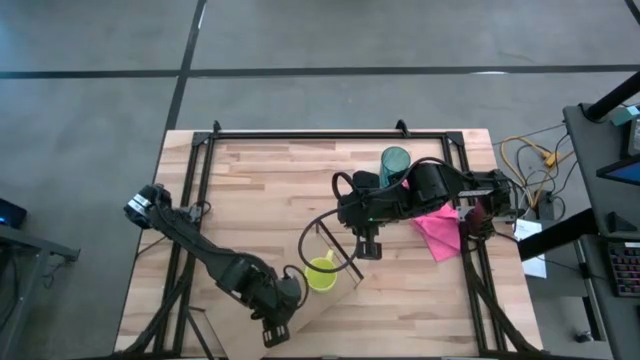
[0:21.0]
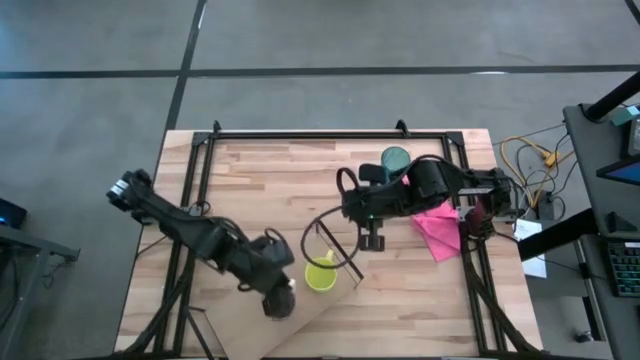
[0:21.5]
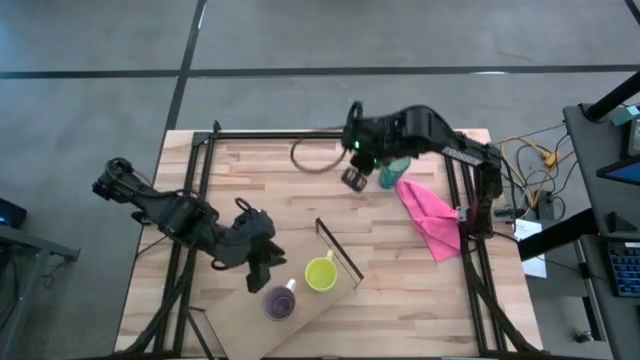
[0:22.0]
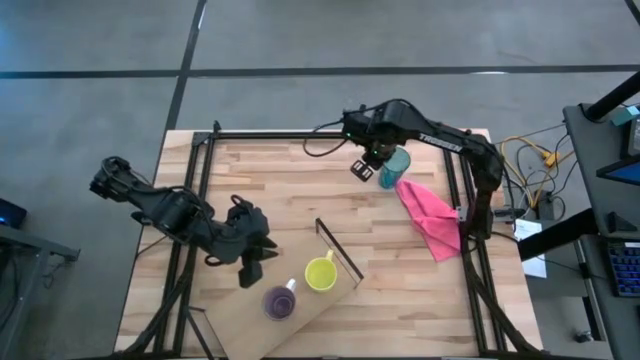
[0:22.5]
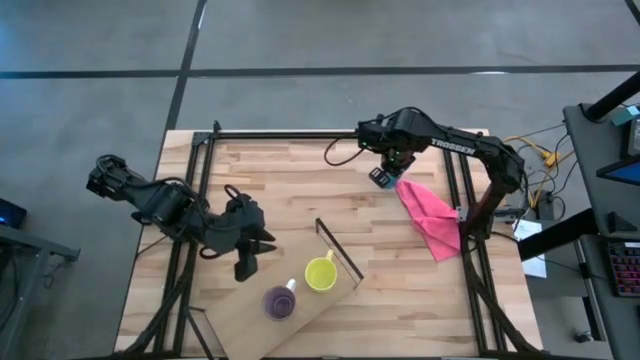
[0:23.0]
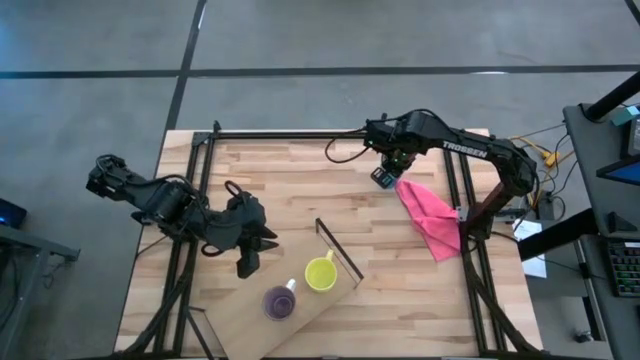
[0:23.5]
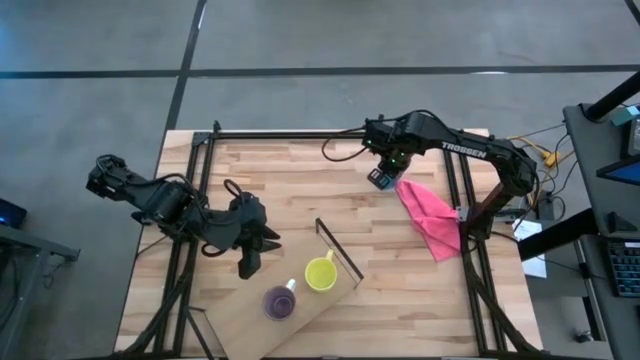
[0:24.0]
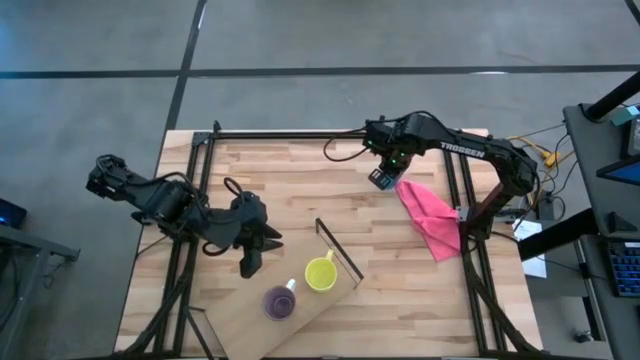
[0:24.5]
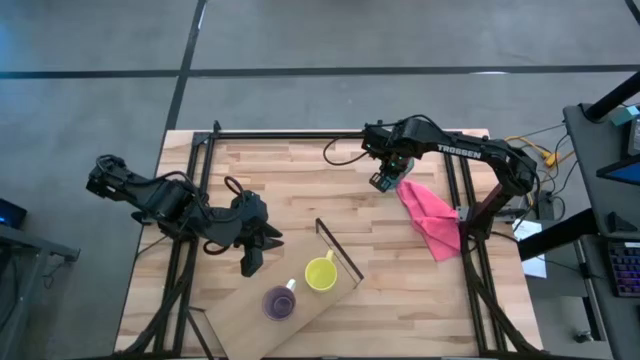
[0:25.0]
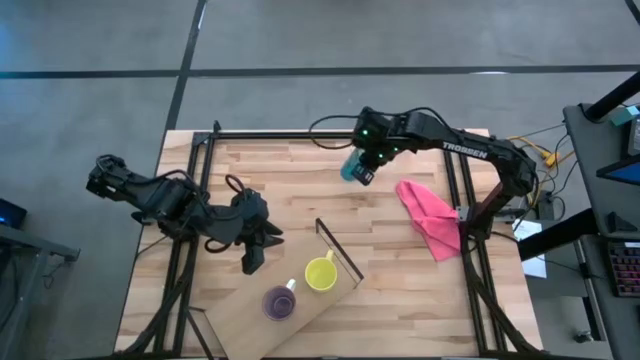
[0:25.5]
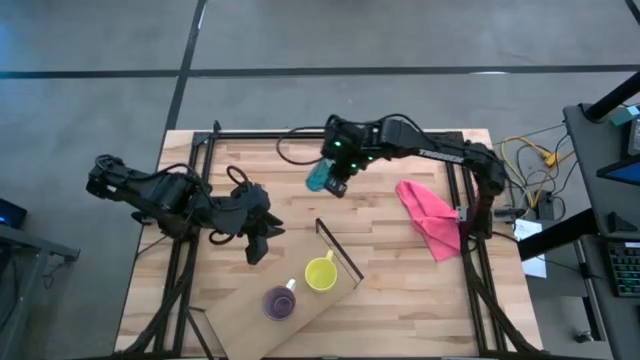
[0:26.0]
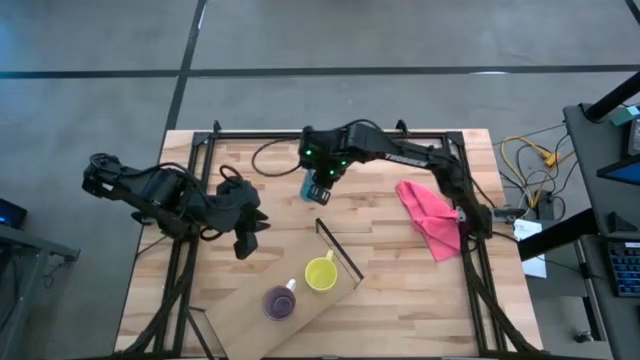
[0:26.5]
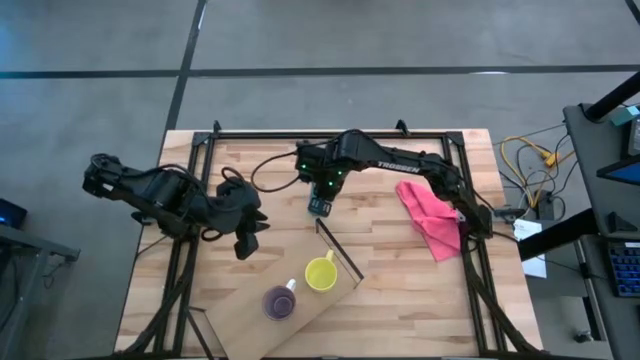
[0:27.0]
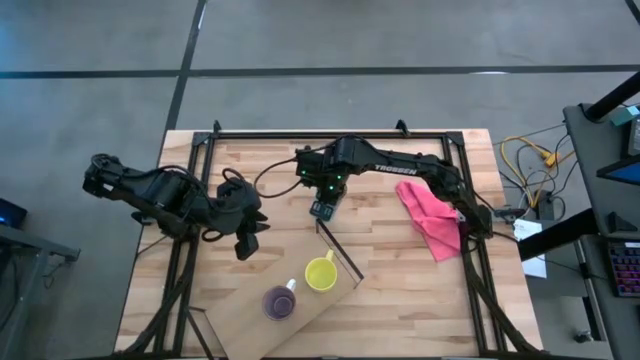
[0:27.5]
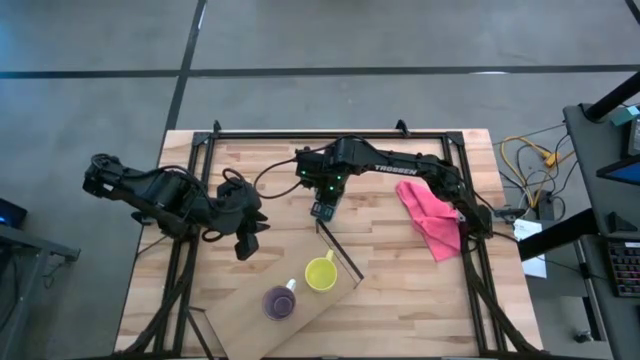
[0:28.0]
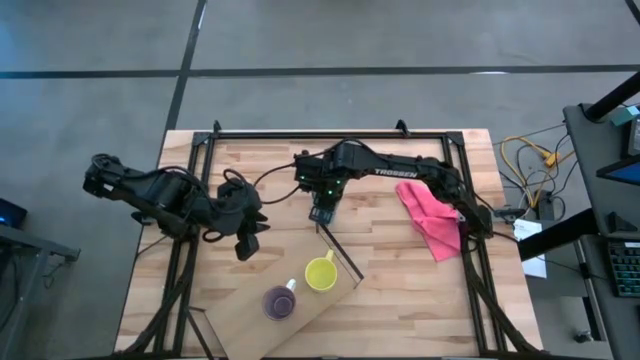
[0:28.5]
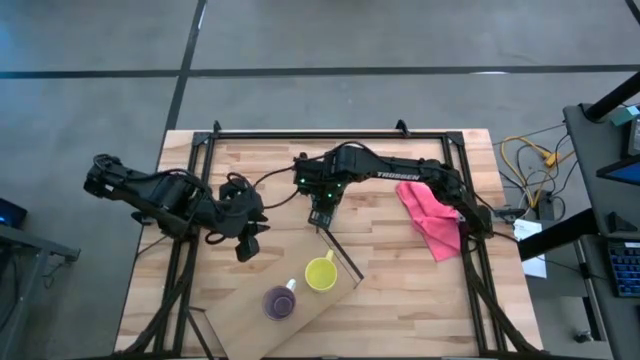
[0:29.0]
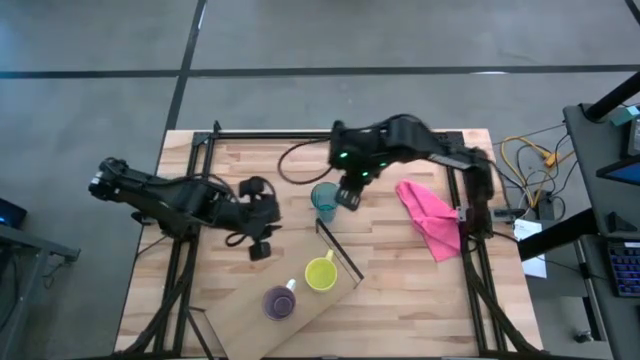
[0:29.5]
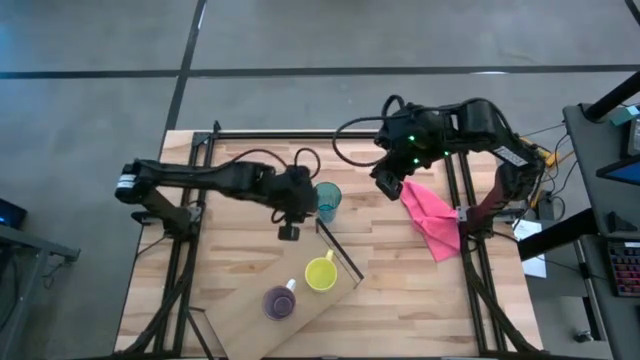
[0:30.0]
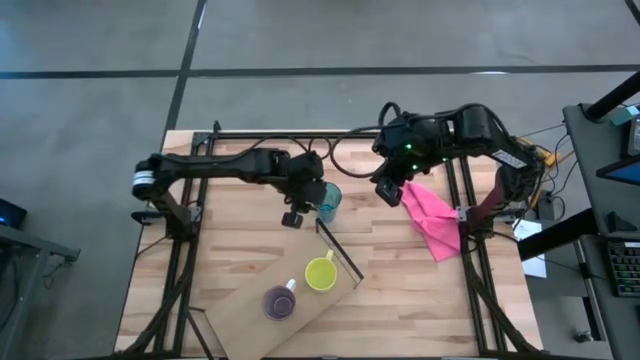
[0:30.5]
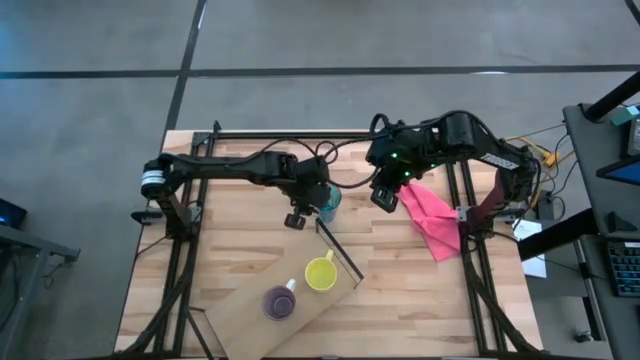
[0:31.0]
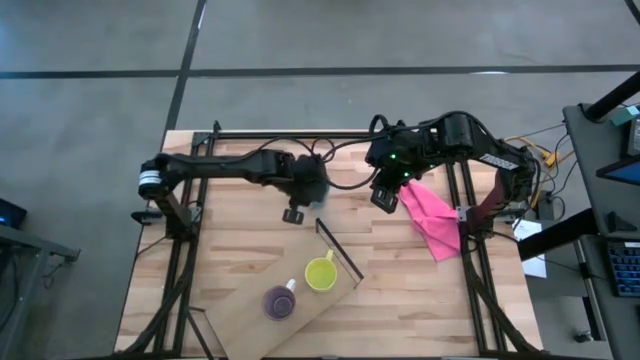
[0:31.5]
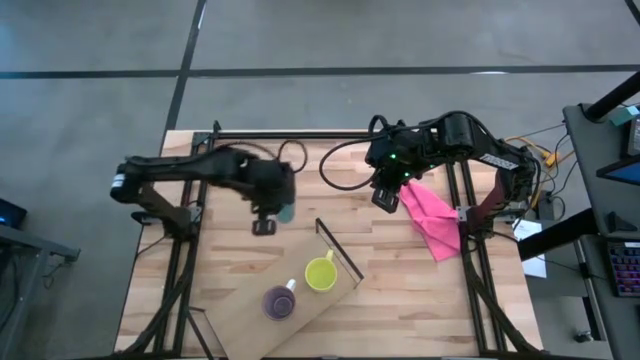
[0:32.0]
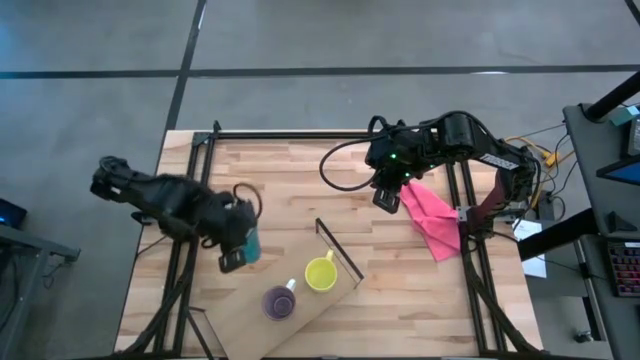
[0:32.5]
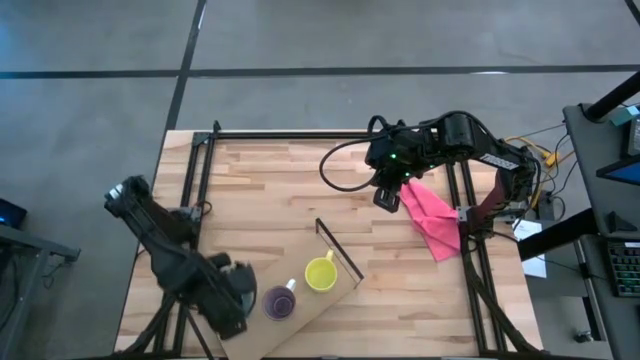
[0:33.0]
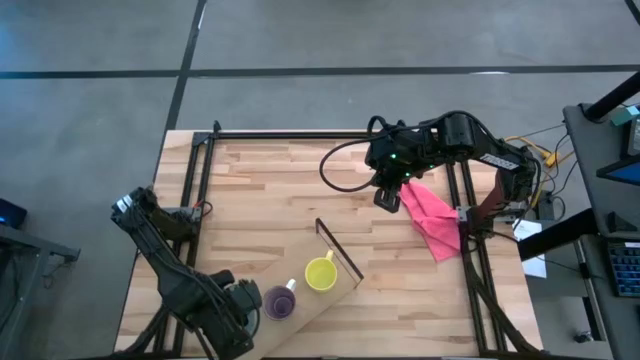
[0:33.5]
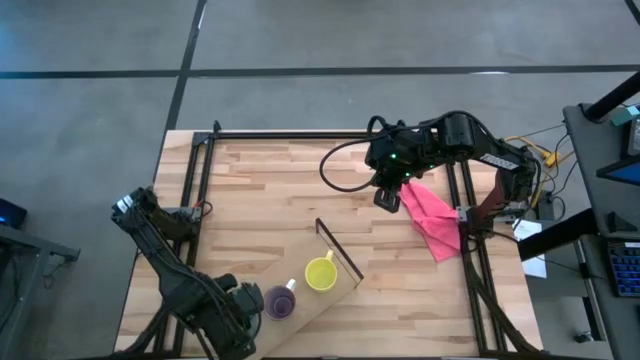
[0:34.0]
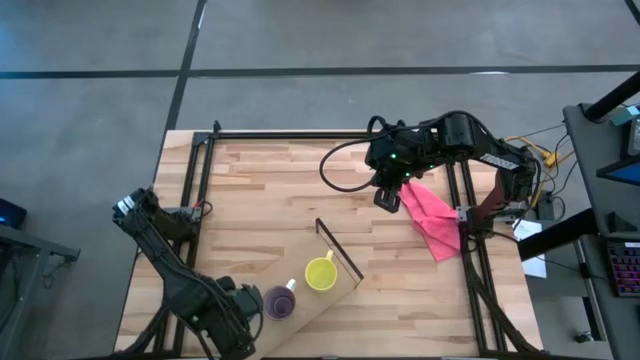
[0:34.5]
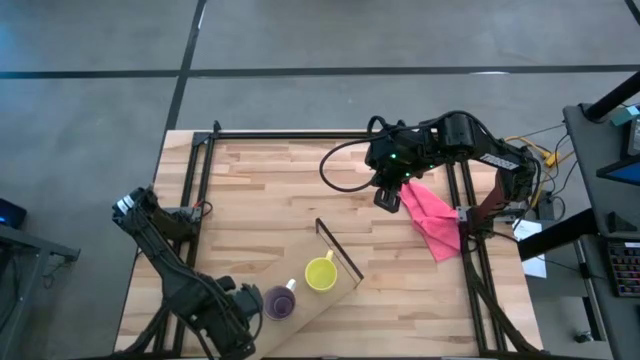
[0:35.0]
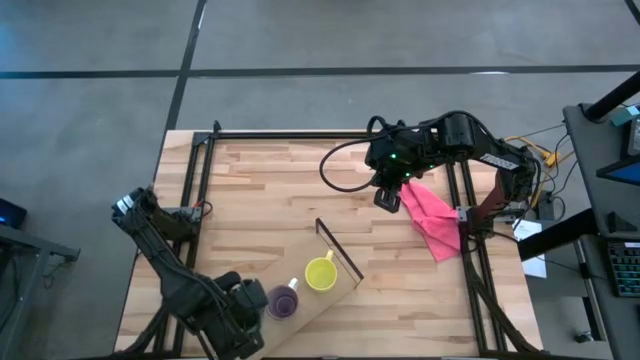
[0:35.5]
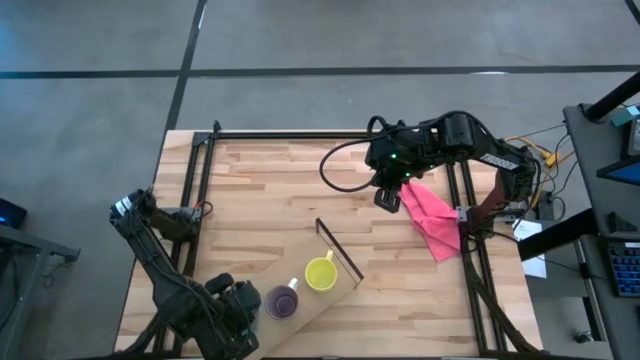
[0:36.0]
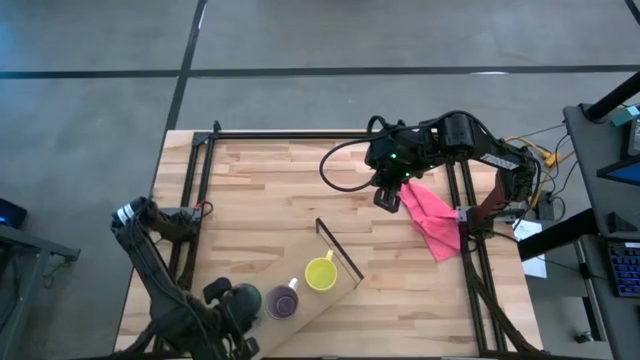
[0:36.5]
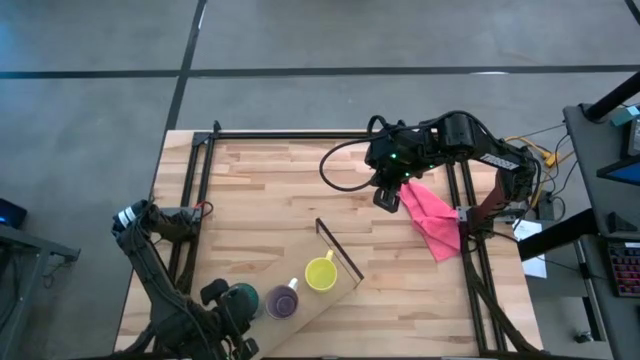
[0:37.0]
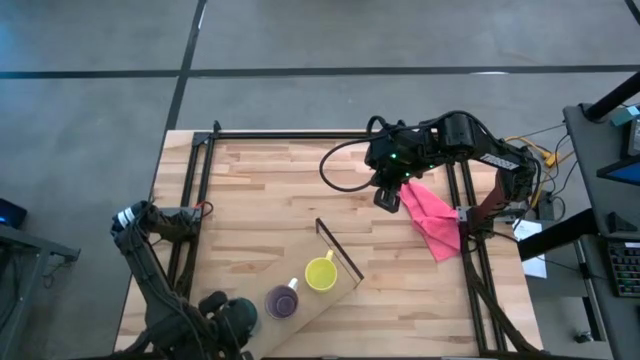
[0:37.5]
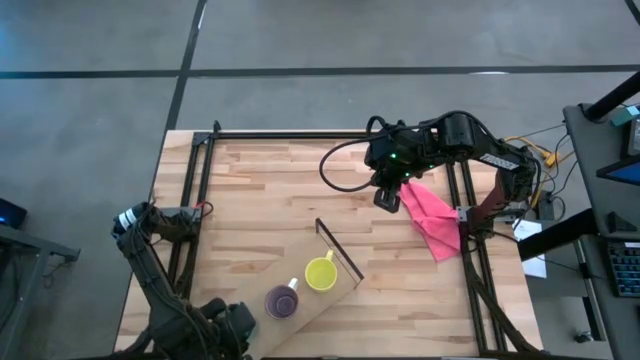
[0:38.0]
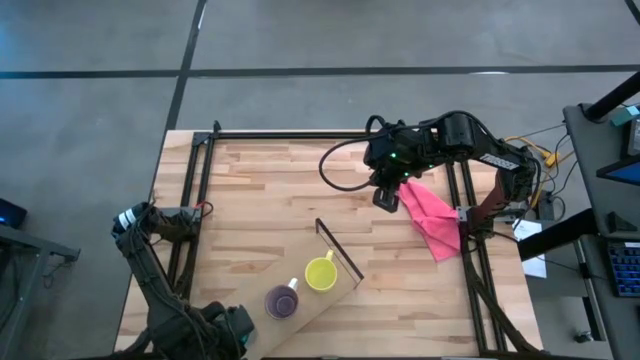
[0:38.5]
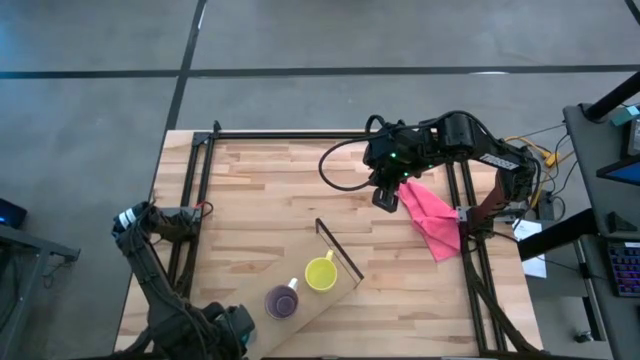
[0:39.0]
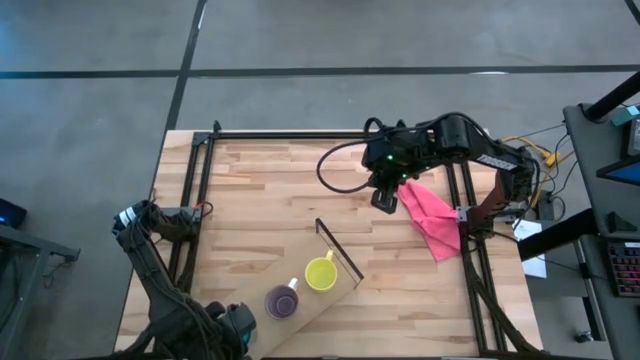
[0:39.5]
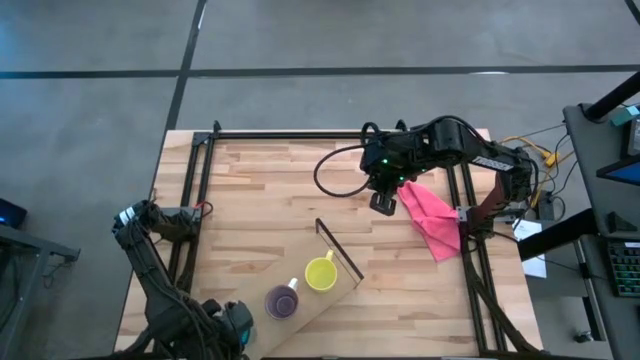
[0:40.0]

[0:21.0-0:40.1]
Task: Stack small to large cups/mugs on shelf
Put the blue cup on the shelf
